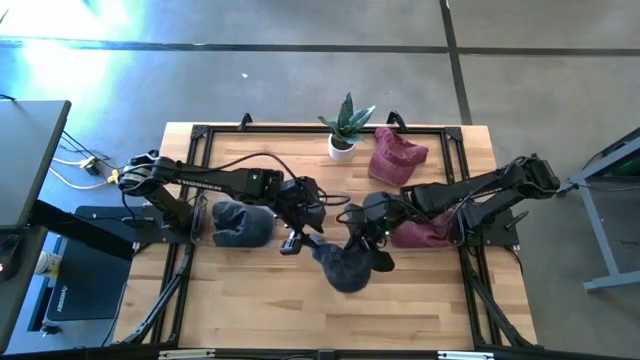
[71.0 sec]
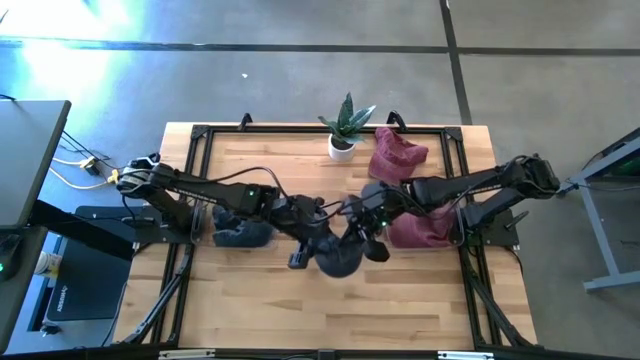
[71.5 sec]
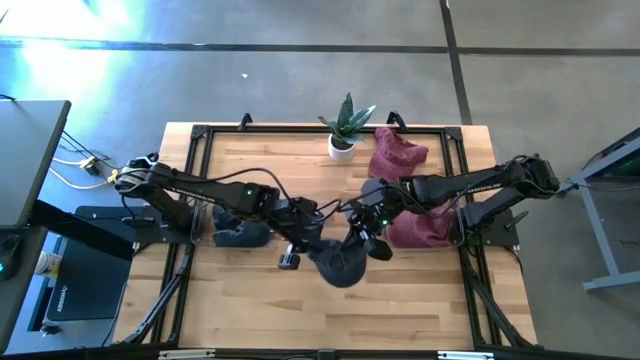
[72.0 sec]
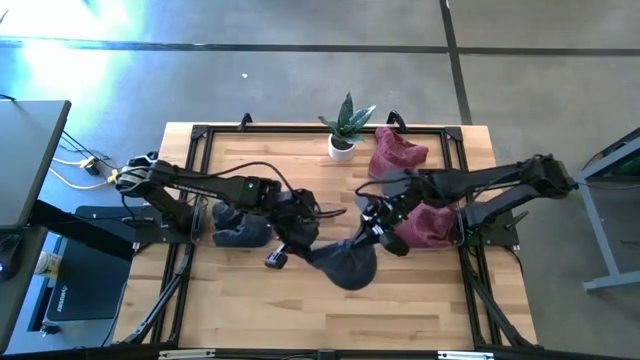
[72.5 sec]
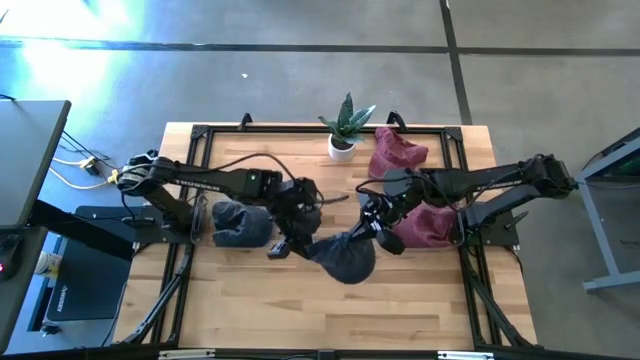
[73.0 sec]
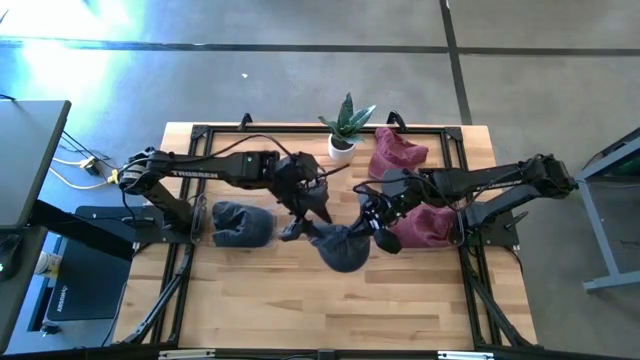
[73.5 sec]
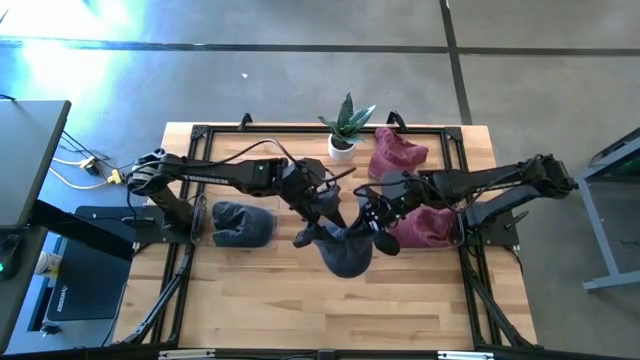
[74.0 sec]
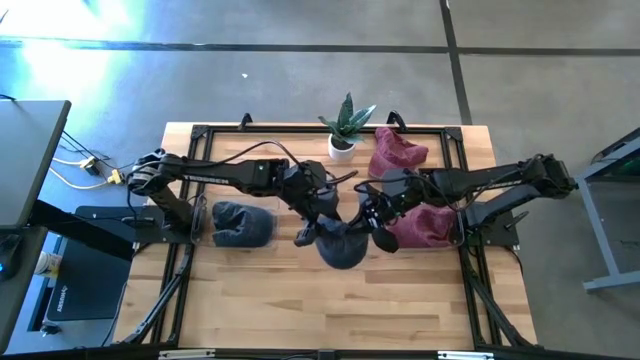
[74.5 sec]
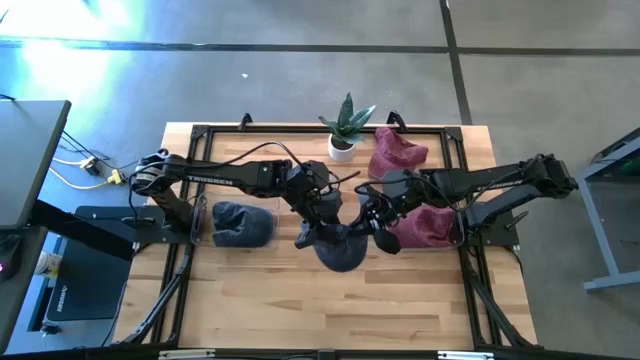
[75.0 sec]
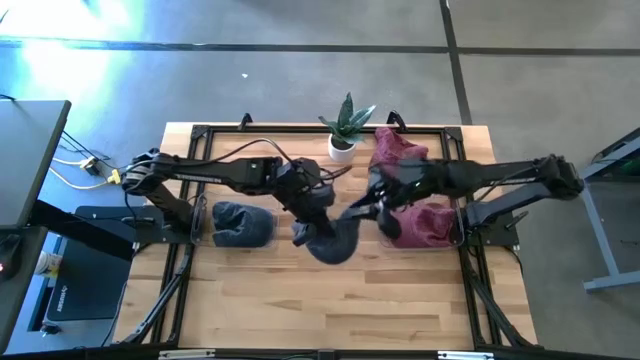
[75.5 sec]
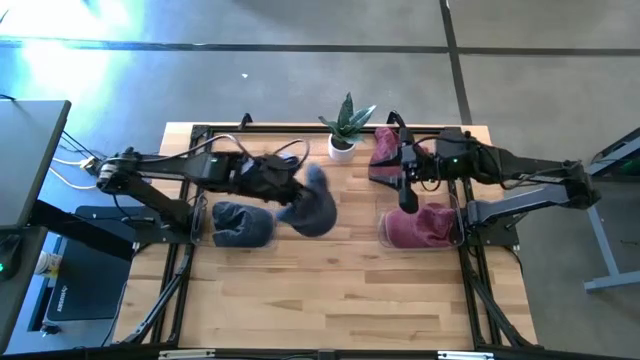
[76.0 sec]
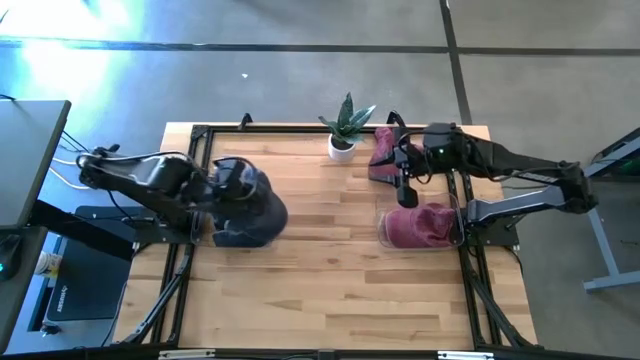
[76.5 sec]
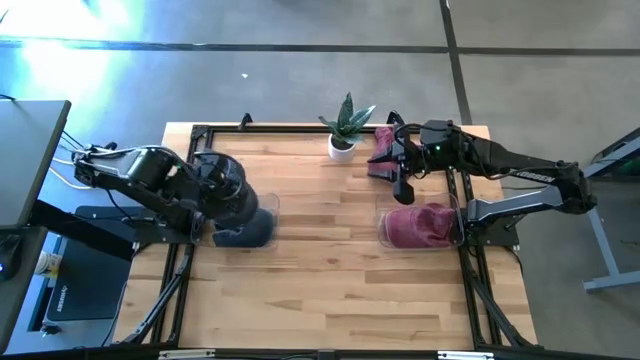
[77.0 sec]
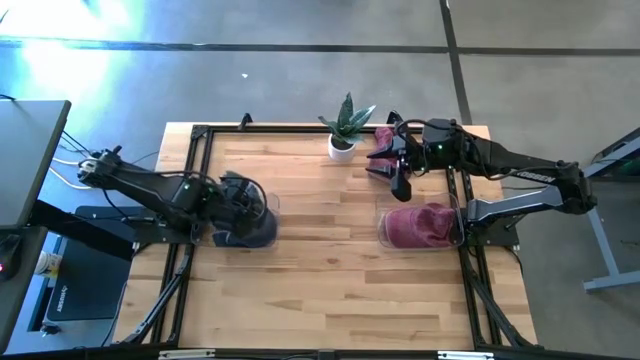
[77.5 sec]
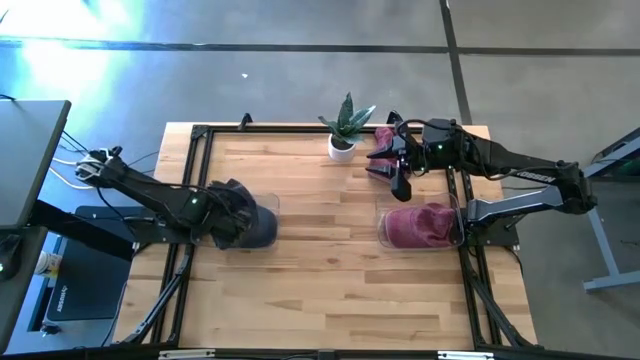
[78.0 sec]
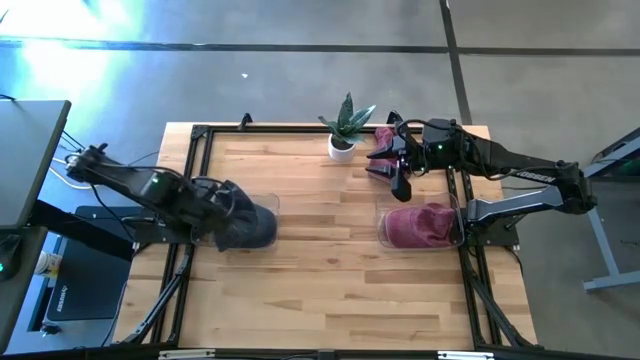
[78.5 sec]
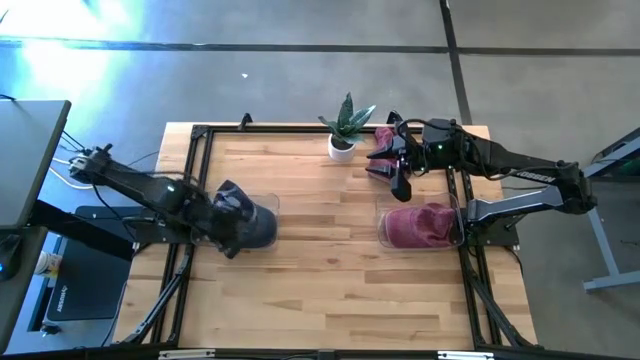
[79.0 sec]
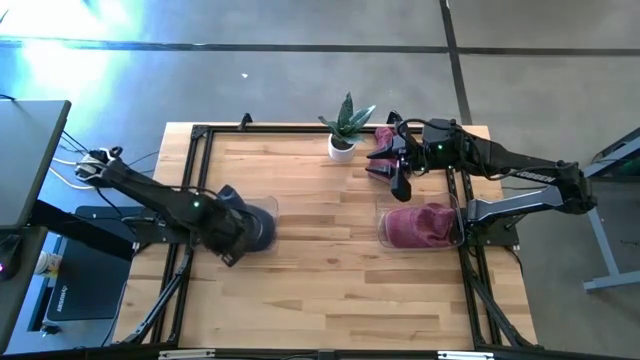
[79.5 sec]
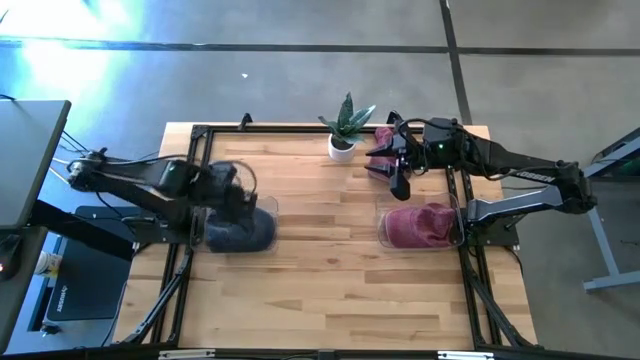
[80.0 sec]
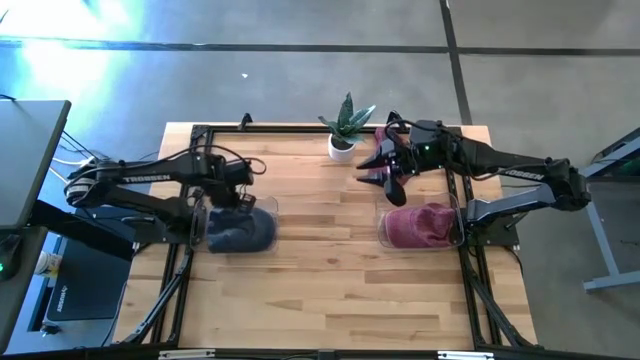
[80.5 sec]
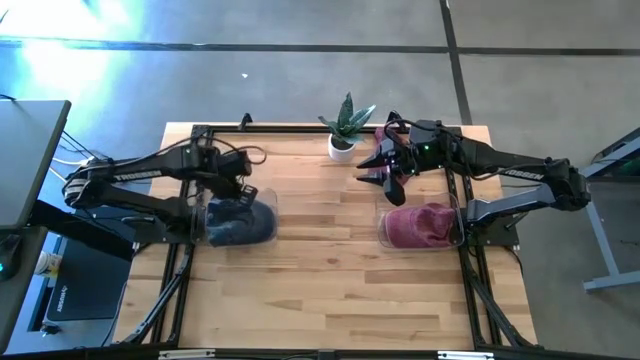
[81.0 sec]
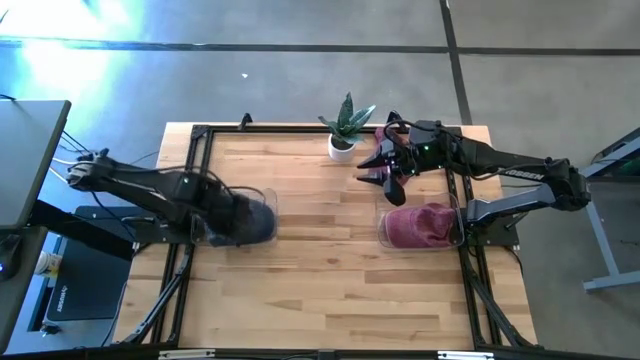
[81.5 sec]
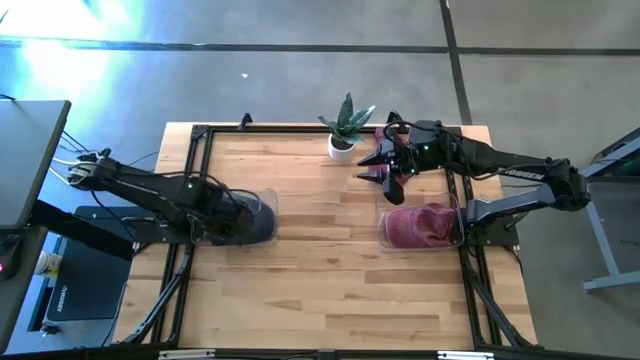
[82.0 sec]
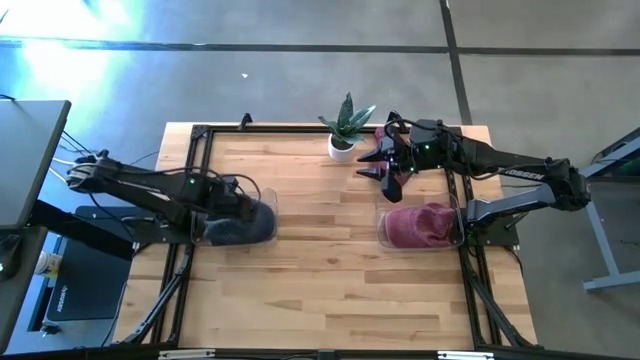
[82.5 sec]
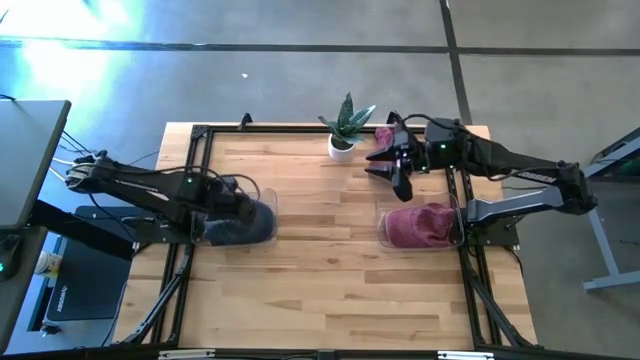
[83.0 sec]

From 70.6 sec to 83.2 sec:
Task: Pick & Place hat
Put the blue cap into the left transparent bin

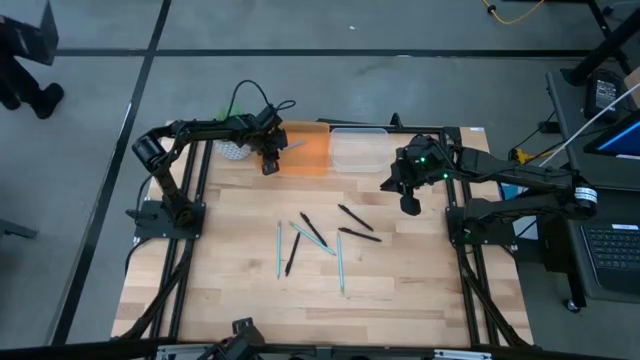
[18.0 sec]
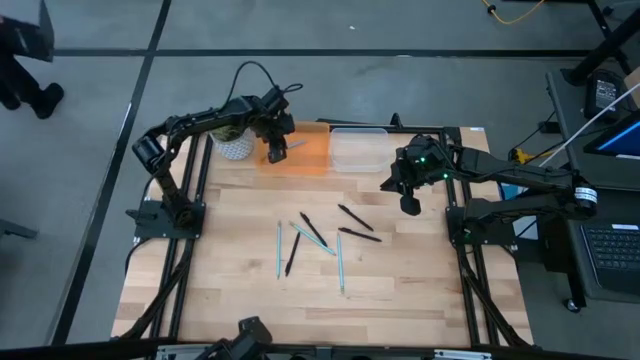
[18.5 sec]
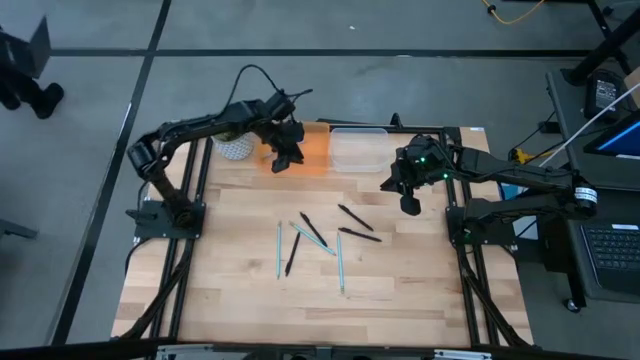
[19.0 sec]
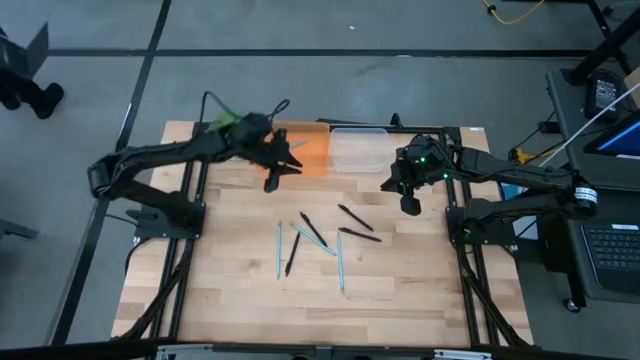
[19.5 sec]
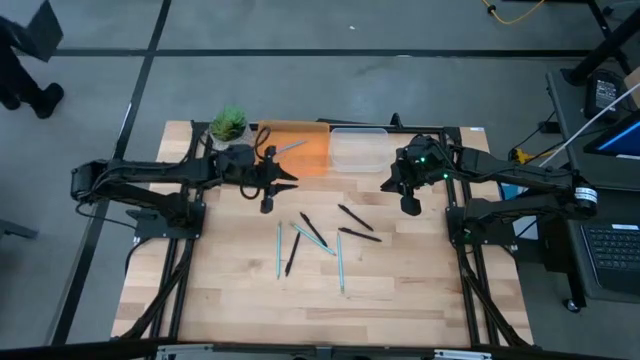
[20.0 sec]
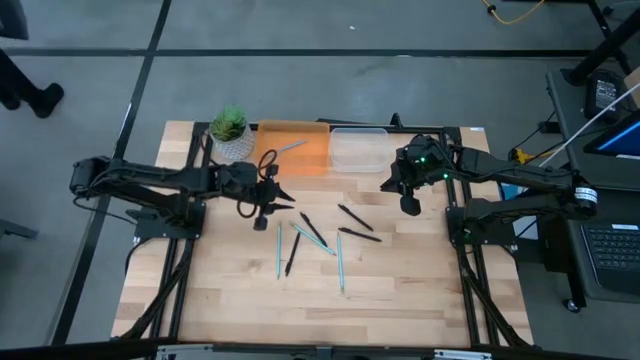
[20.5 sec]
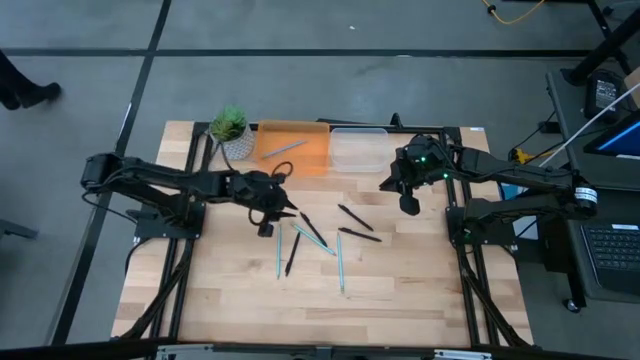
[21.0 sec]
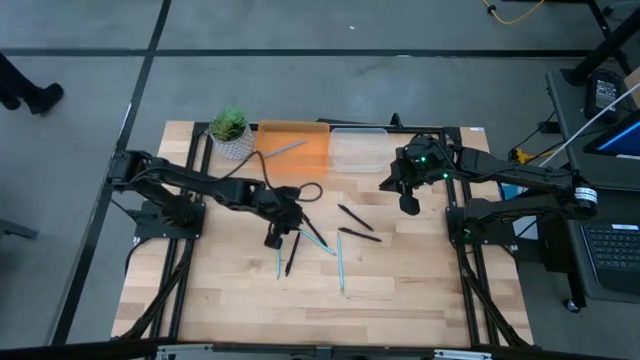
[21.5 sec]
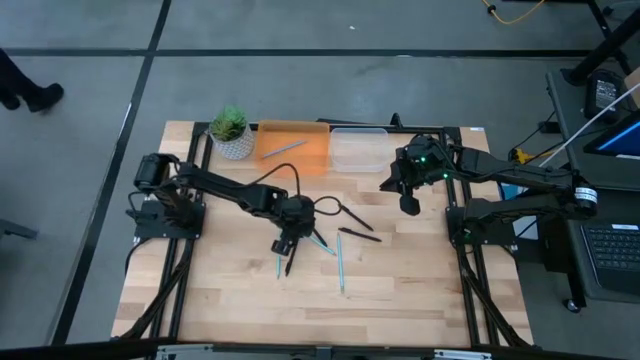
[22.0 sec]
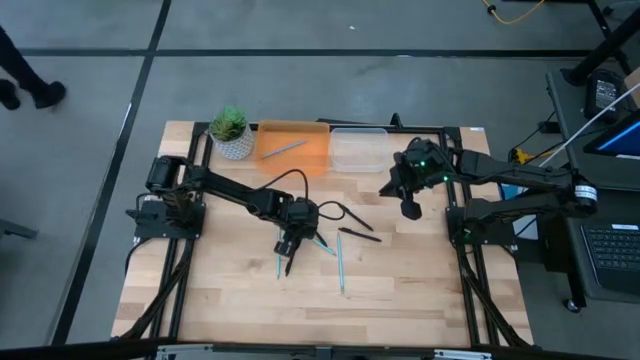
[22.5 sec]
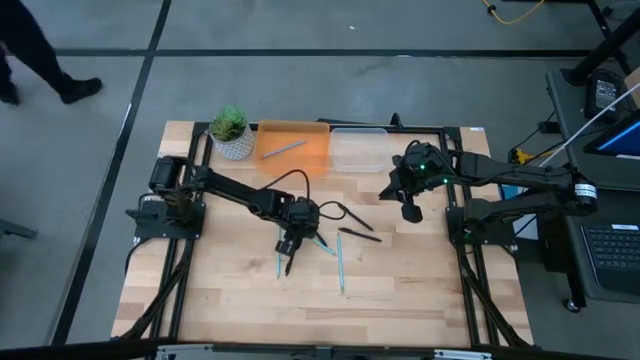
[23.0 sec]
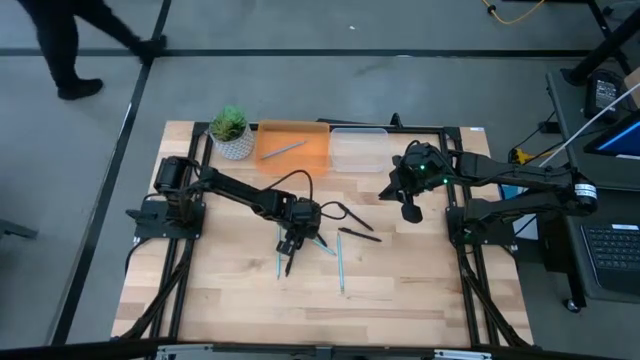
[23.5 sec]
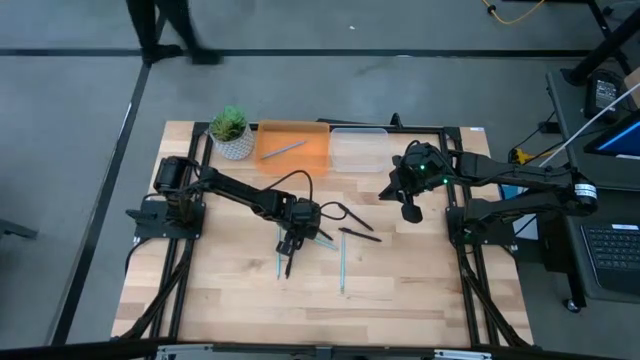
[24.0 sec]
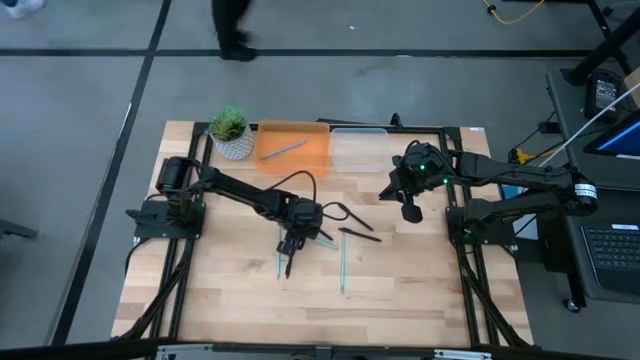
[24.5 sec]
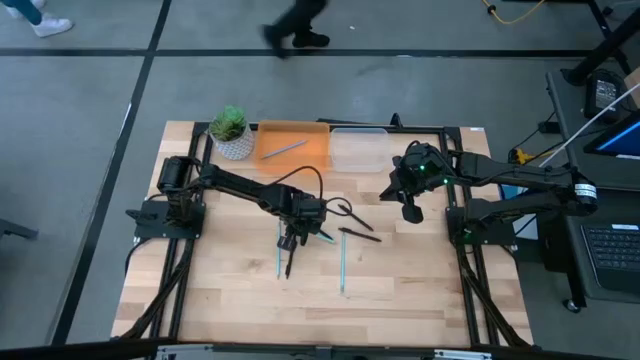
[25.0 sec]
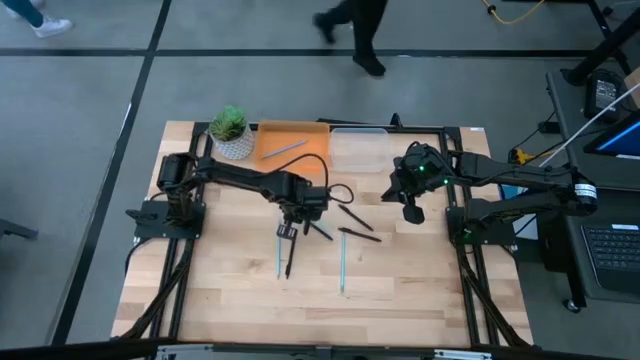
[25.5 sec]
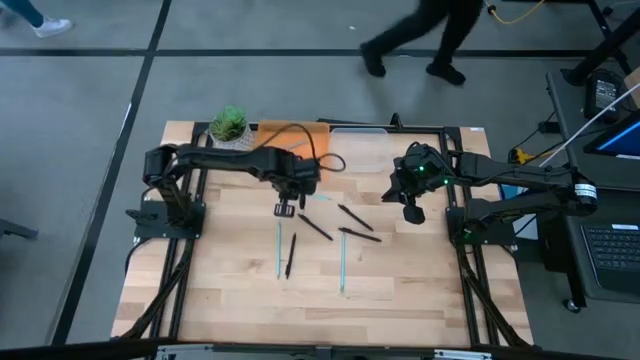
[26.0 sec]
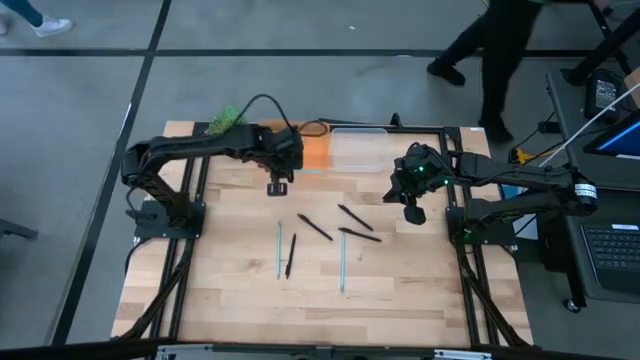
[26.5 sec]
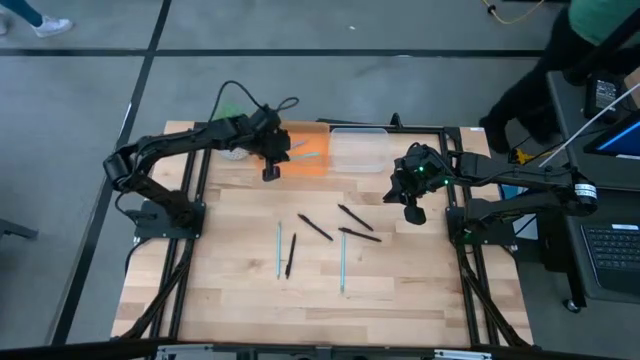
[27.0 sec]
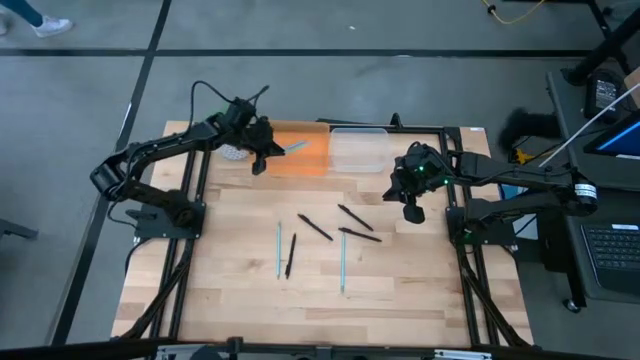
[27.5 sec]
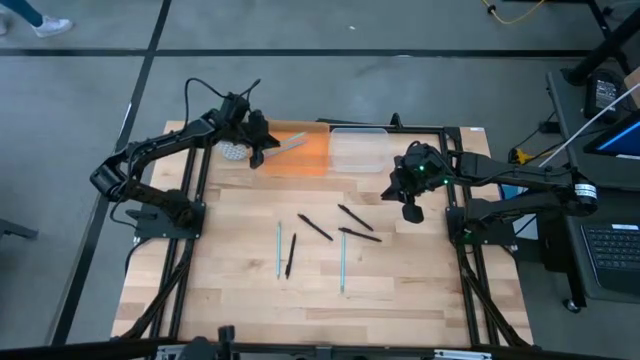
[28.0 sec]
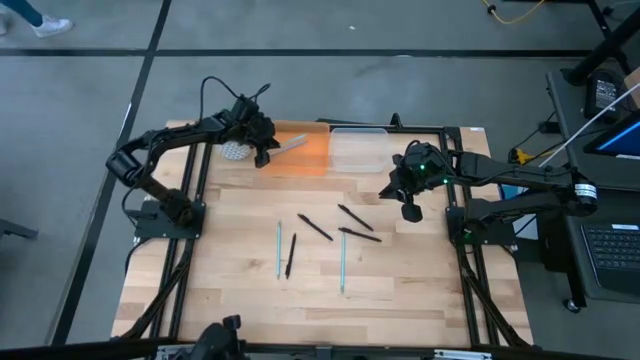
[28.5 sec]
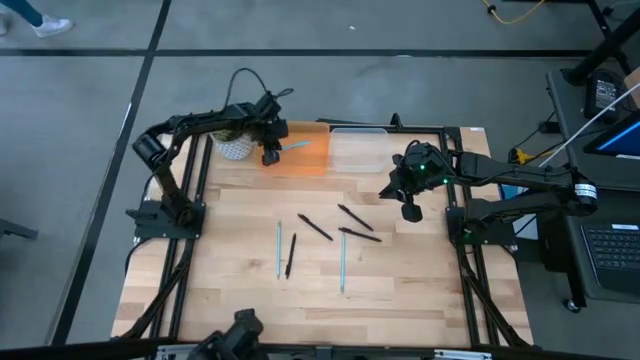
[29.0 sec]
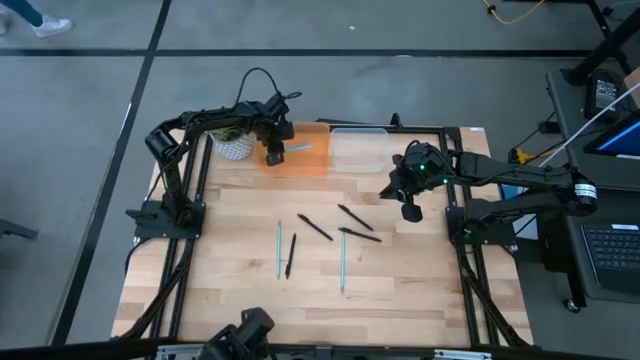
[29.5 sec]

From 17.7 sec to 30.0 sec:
Task: Sort pens & pencils
Put the light blue pencil into the orange bin
